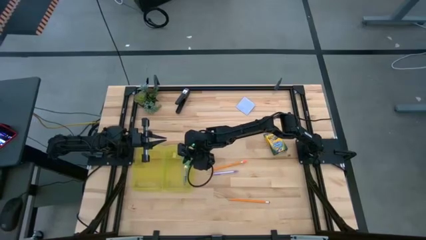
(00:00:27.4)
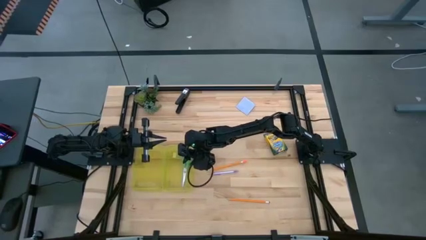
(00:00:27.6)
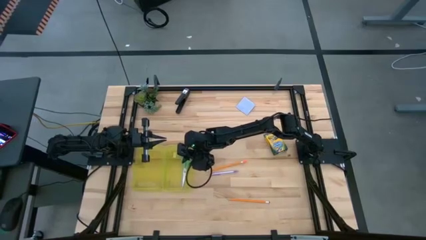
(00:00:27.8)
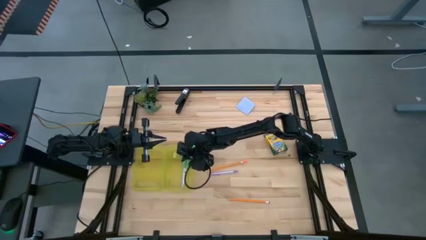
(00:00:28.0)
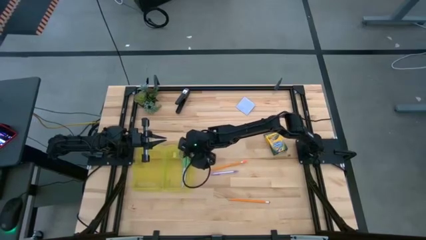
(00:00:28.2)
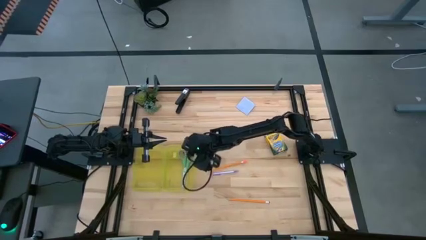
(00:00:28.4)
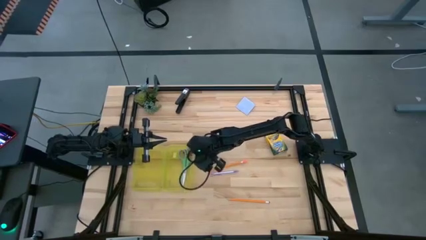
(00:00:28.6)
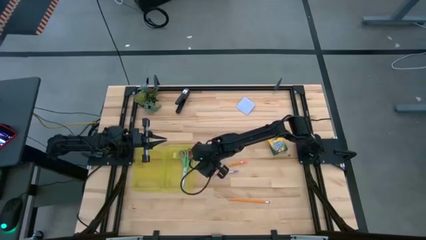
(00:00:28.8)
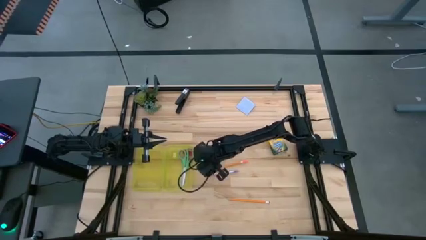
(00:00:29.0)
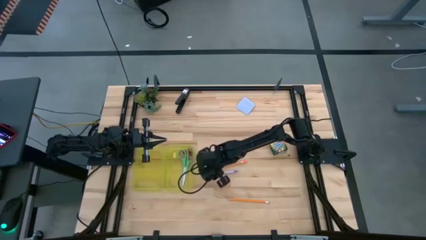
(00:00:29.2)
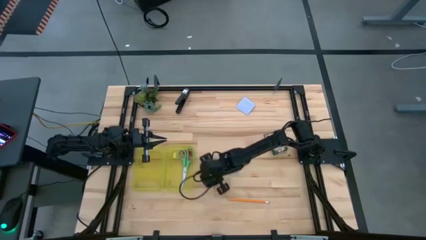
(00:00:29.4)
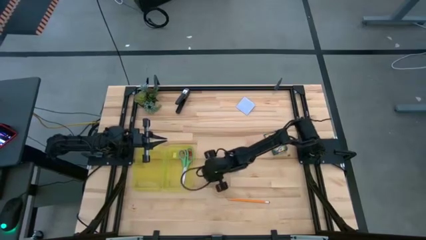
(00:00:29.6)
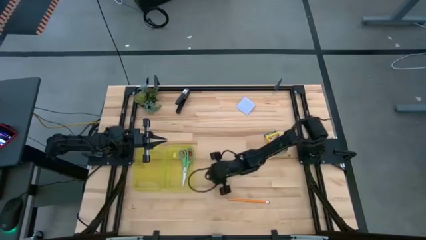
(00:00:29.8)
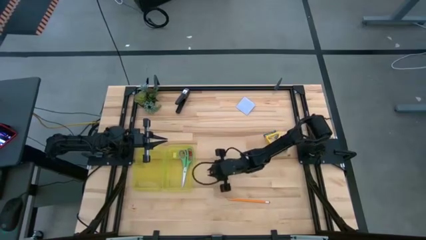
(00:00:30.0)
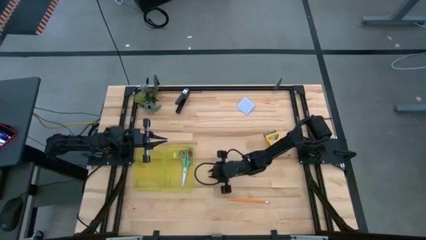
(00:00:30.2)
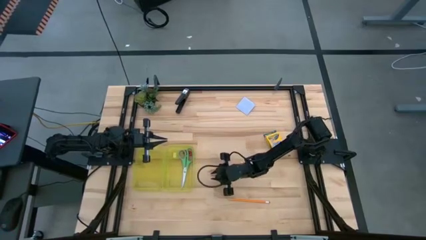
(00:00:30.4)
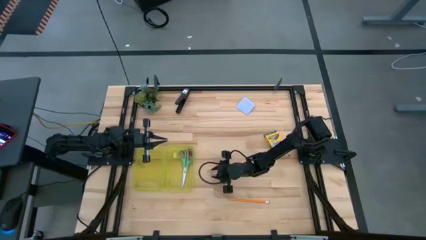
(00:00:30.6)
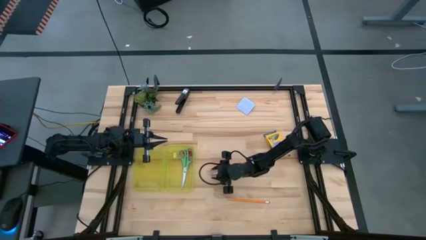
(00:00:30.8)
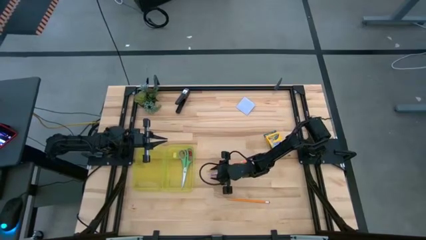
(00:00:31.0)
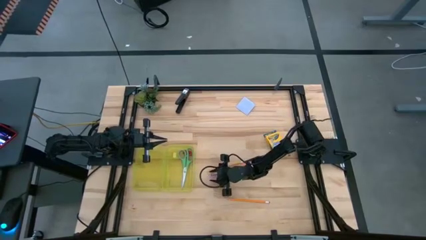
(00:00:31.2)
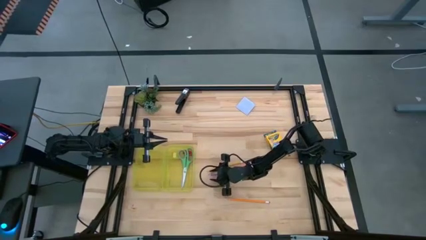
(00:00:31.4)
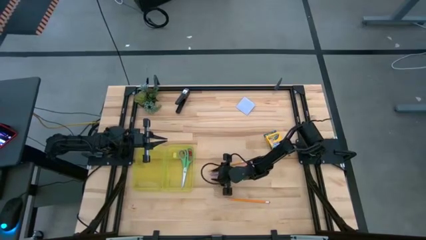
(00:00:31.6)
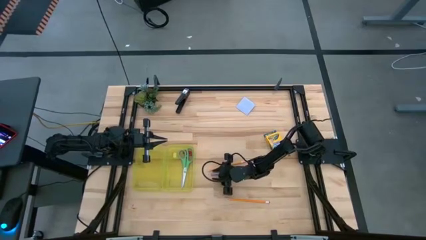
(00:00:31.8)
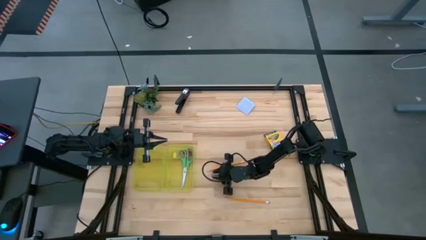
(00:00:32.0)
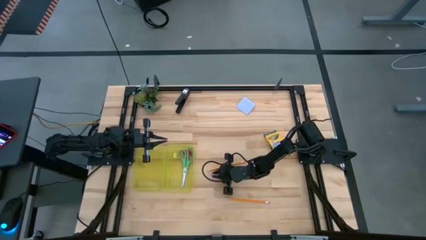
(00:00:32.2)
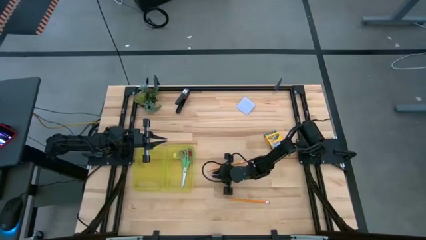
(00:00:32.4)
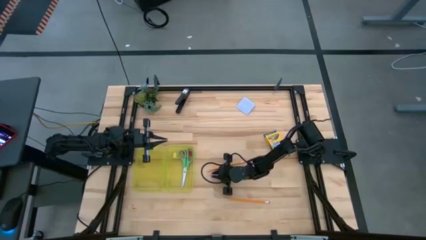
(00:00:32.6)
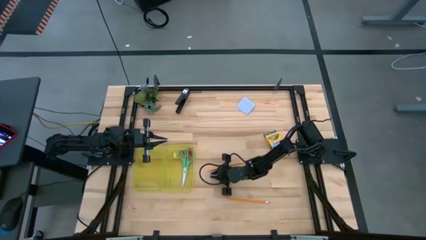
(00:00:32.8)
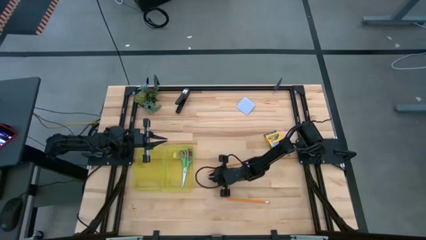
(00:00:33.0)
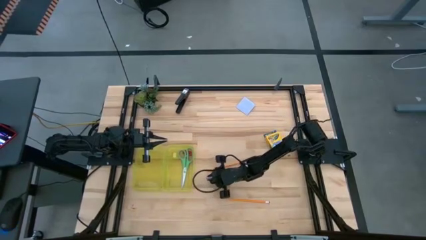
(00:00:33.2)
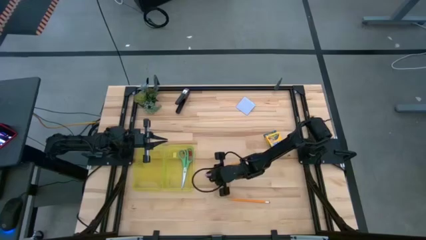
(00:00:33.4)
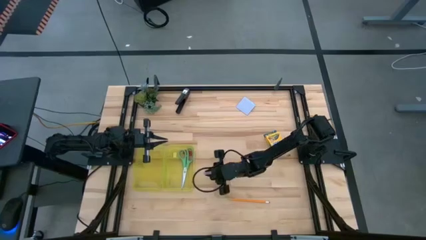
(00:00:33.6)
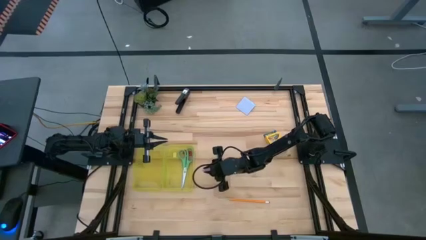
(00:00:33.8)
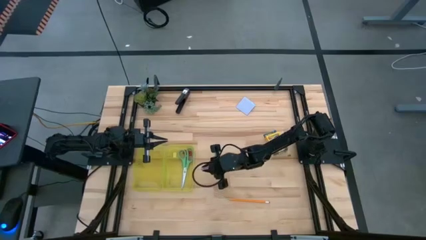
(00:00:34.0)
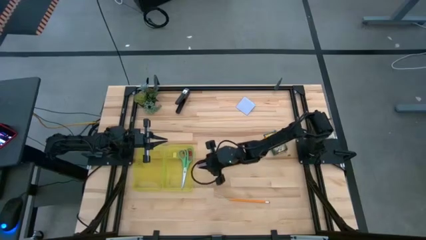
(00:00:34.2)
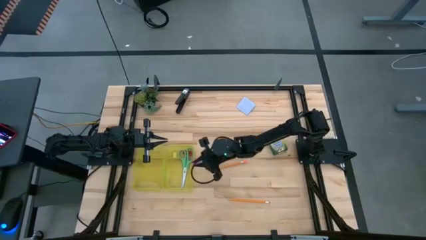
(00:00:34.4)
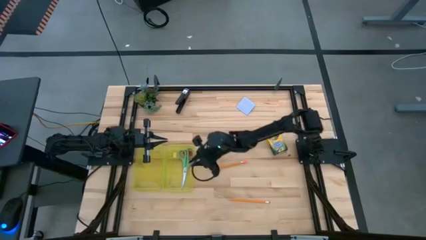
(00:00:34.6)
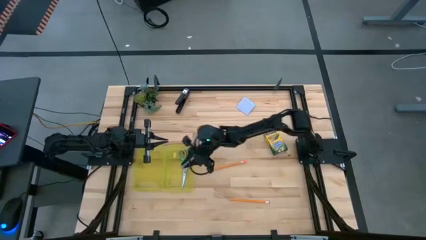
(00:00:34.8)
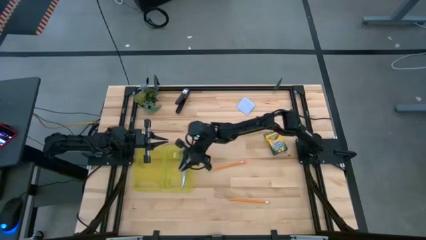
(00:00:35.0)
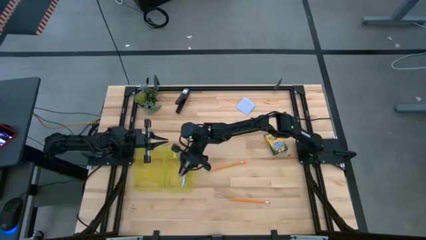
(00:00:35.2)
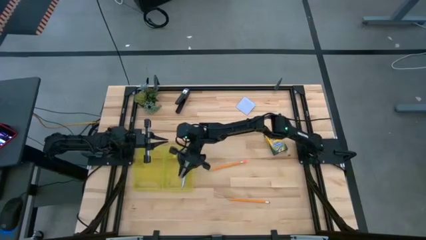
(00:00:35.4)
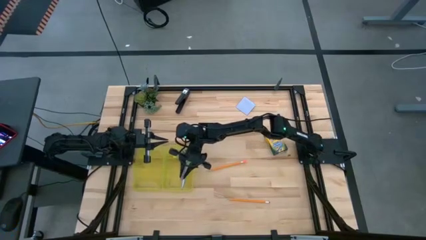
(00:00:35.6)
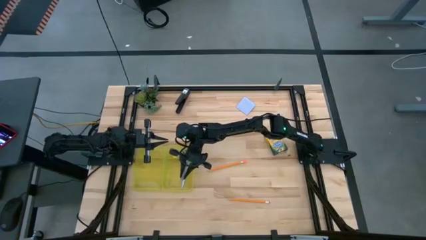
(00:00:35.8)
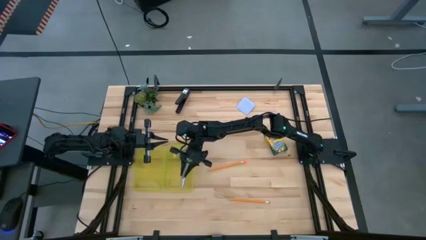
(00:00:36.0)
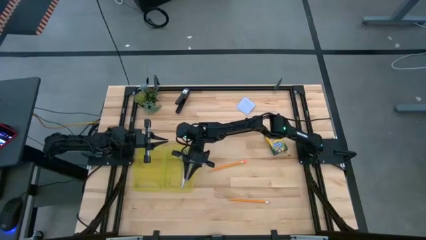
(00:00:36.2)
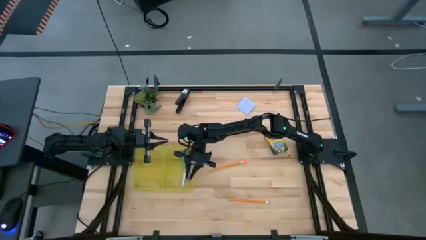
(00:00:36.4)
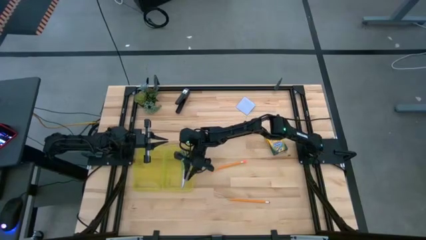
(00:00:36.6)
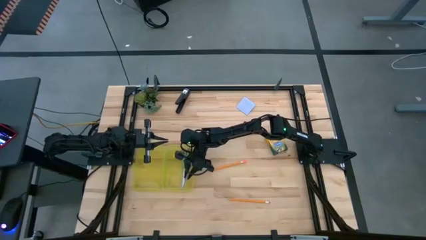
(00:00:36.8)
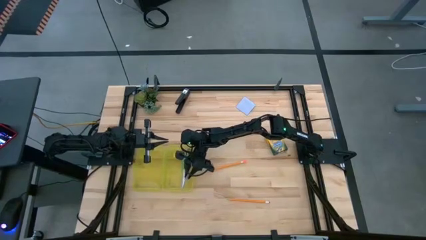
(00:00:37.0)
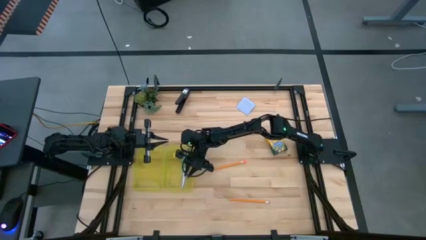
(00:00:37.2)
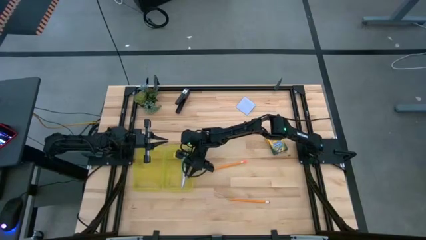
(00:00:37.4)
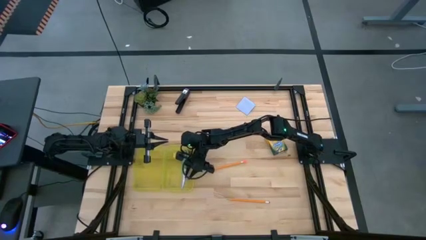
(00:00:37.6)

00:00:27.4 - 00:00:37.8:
Task: Pack school essentials
Put the purple pen into the yellow pencil box

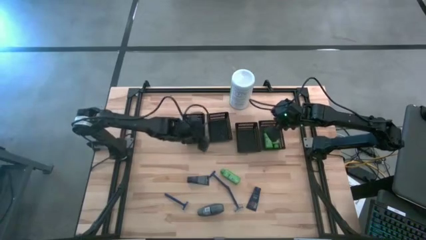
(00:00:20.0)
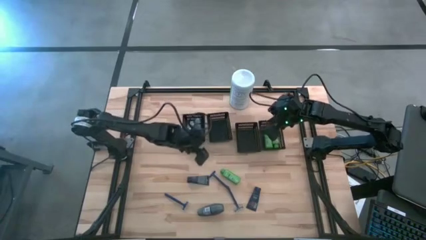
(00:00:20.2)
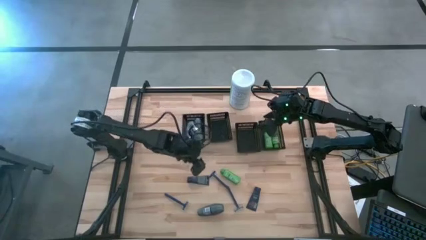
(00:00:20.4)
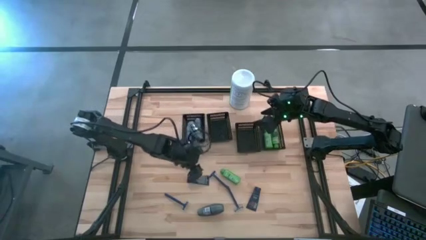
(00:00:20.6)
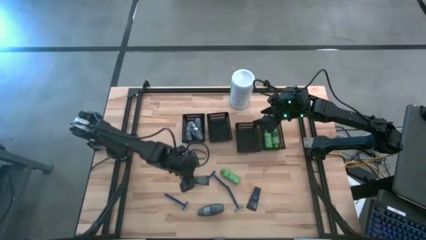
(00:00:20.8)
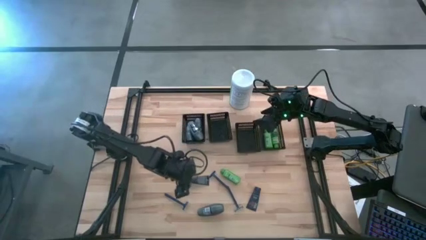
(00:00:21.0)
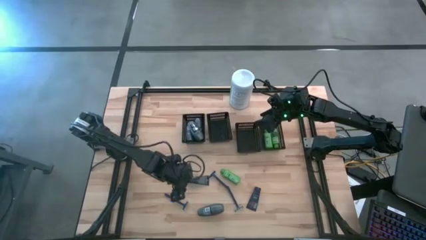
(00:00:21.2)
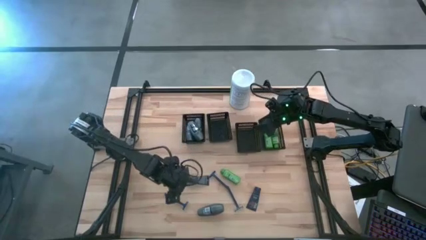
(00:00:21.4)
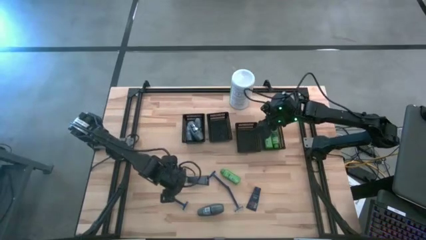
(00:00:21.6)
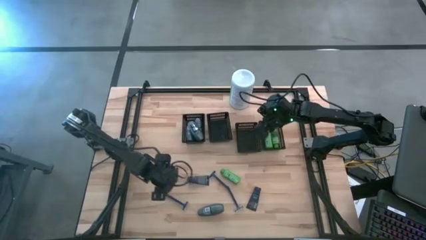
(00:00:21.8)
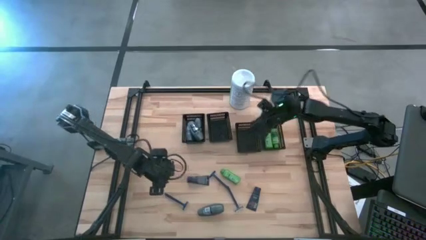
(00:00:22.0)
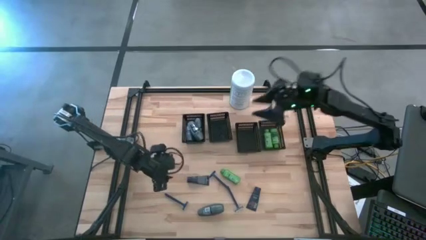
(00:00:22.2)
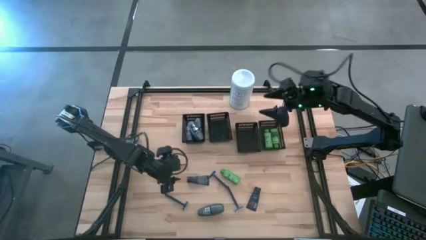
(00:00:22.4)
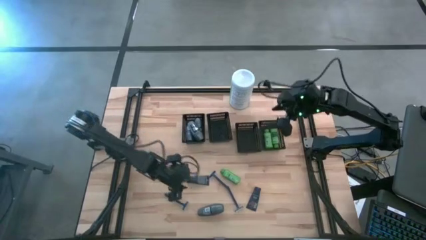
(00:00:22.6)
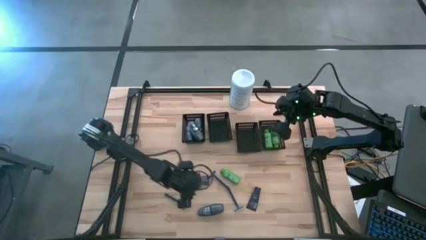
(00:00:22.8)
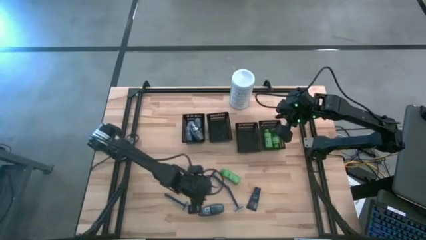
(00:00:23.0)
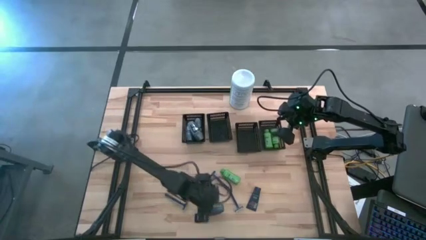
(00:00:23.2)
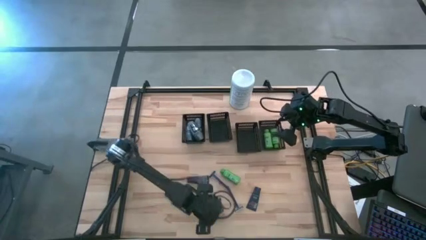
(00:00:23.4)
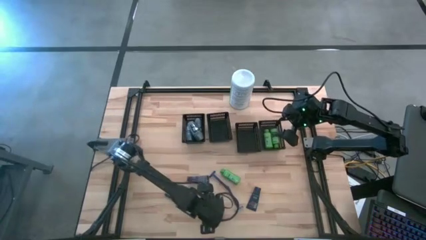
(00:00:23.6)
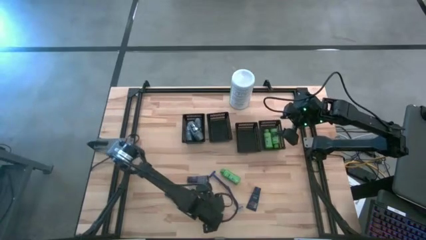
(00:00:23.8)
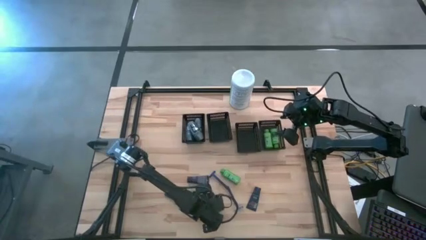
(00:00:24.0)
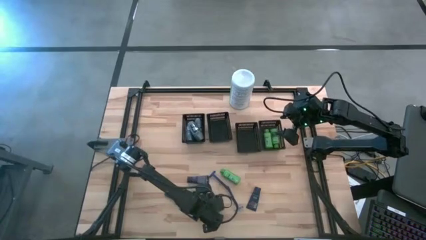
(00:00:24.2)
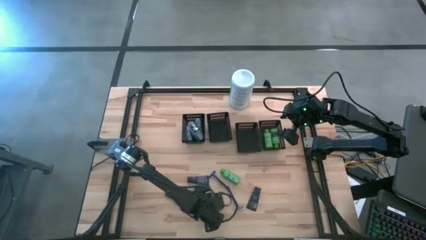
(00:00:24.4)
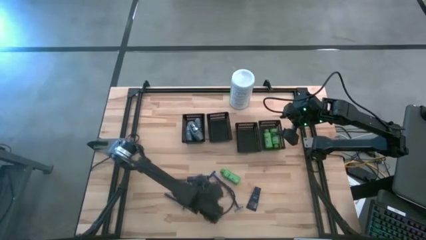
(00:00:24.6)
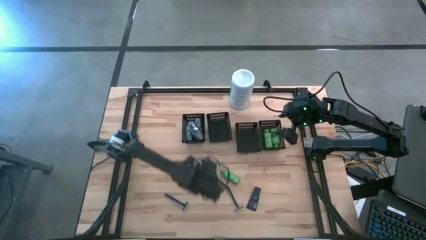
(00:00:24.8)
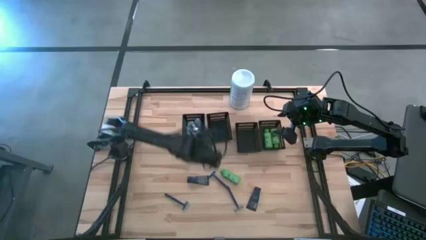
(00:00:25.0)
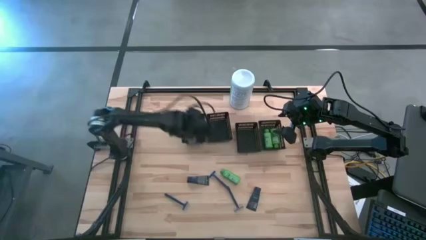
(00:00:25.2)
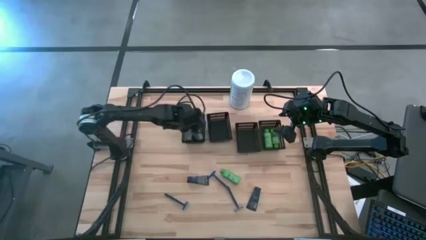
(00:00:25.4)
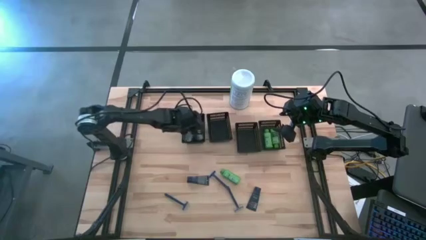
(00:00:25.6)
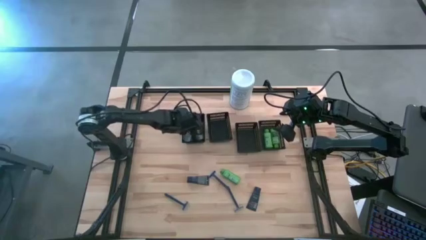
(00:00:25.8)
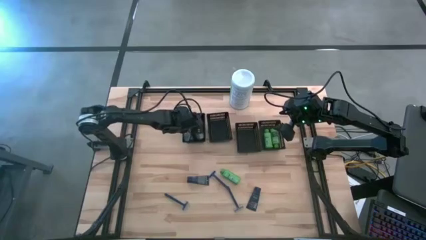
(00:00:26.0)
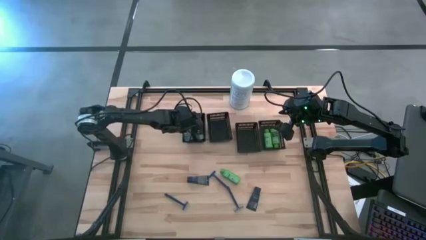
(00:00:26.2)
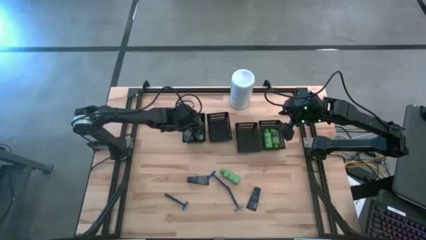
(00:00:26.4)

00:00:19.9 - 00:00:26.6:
Task: Pick & Place Travel size toiletries
Put the black deodorant into the left black bin
